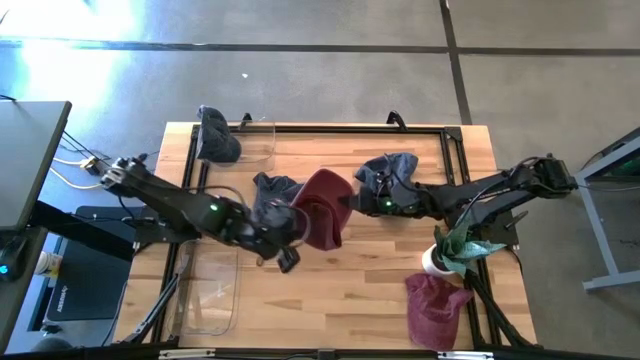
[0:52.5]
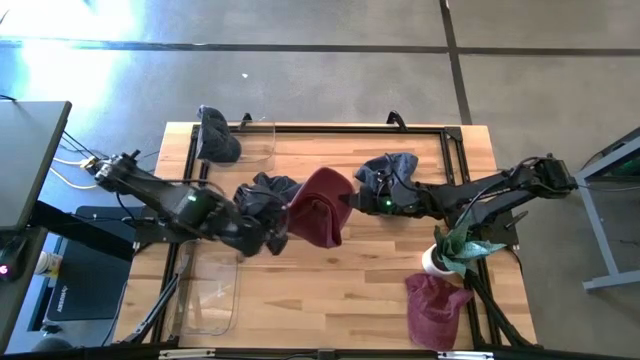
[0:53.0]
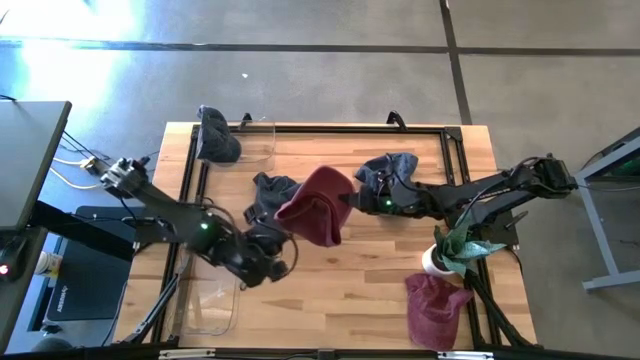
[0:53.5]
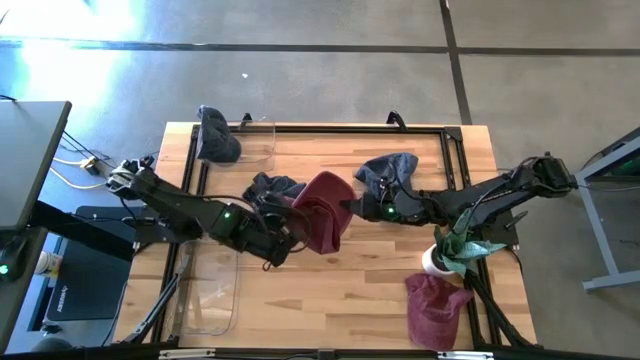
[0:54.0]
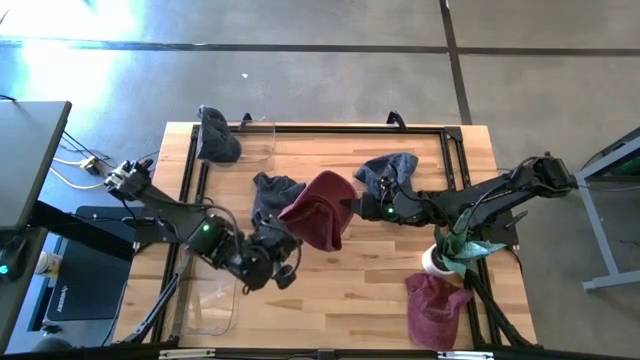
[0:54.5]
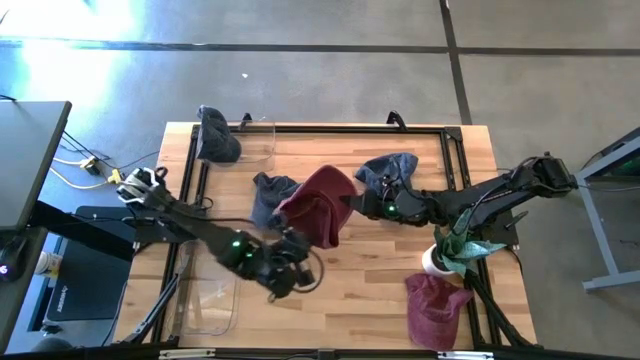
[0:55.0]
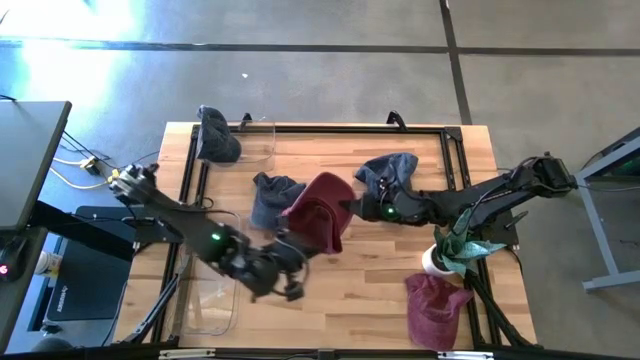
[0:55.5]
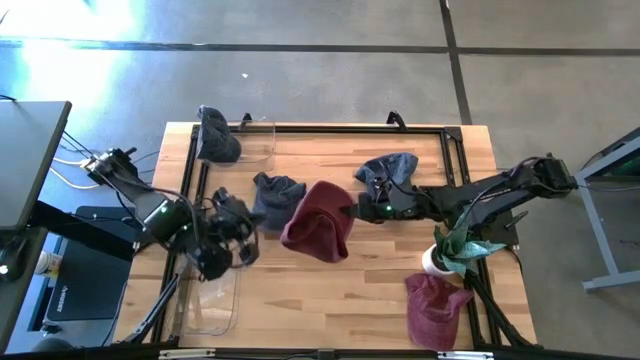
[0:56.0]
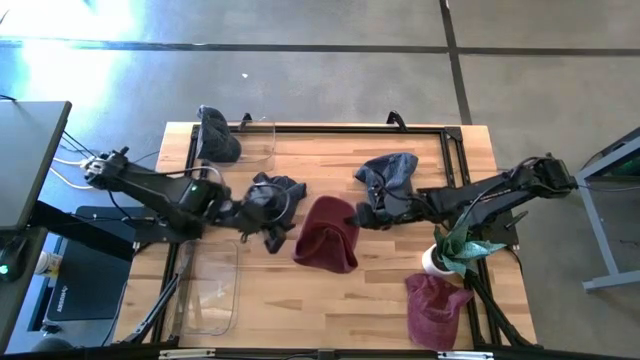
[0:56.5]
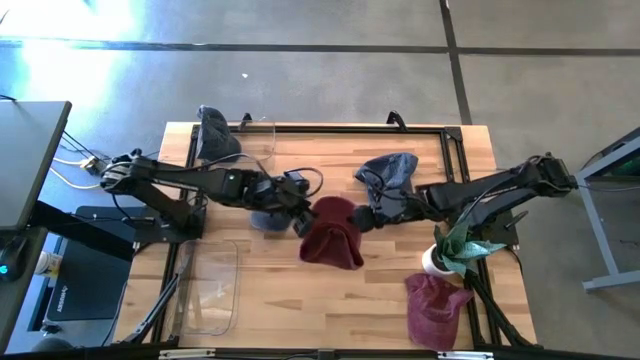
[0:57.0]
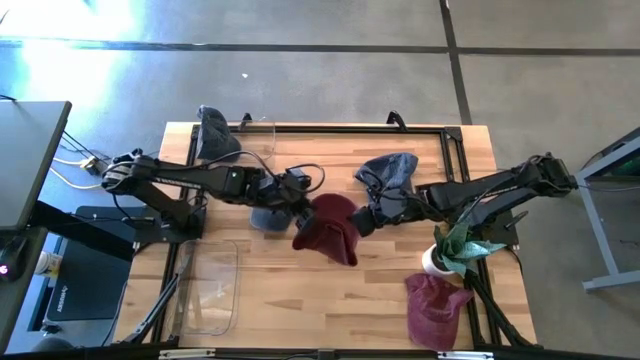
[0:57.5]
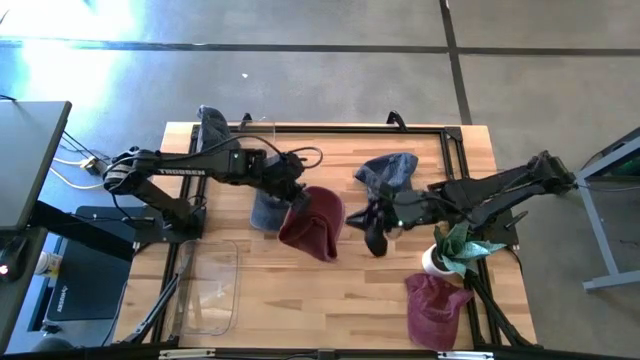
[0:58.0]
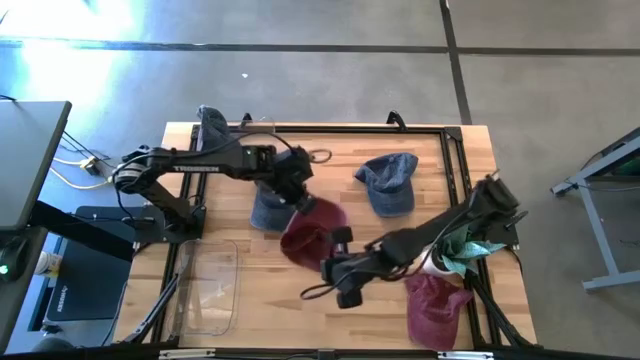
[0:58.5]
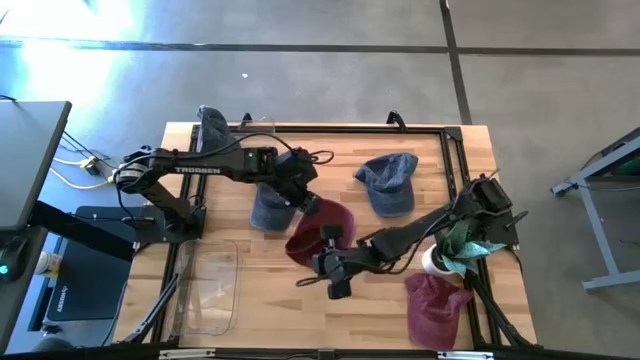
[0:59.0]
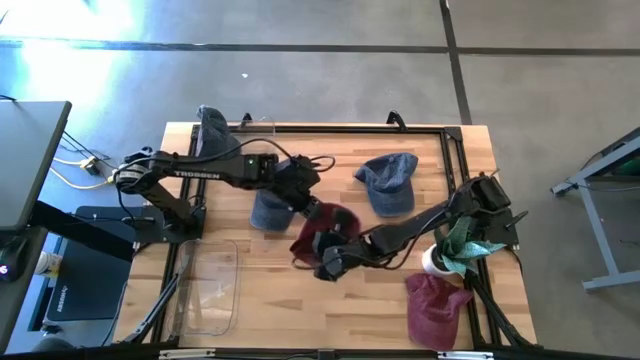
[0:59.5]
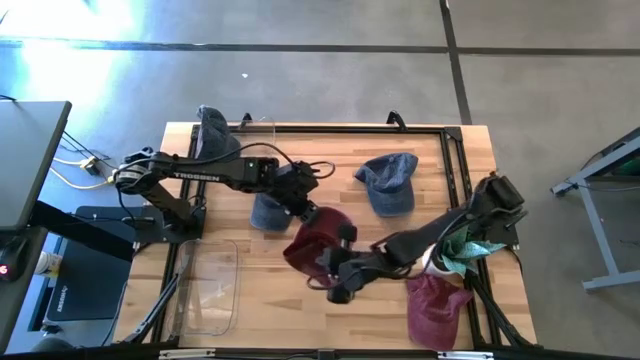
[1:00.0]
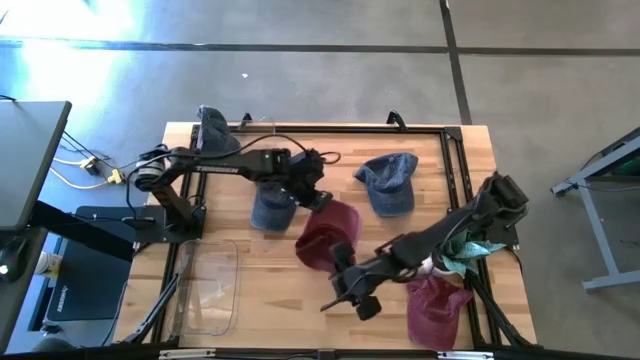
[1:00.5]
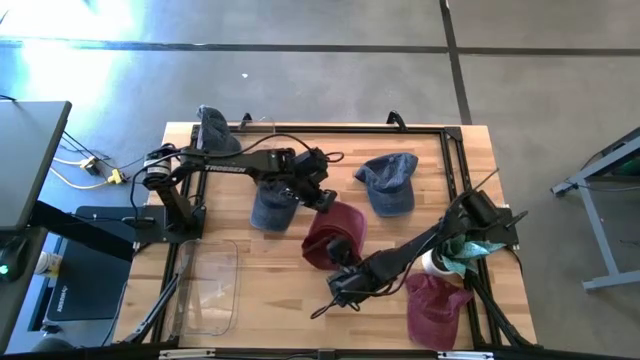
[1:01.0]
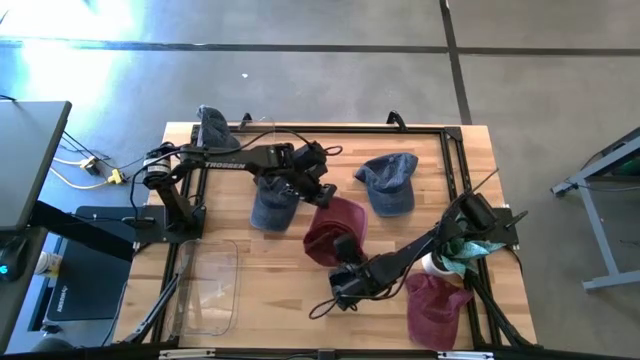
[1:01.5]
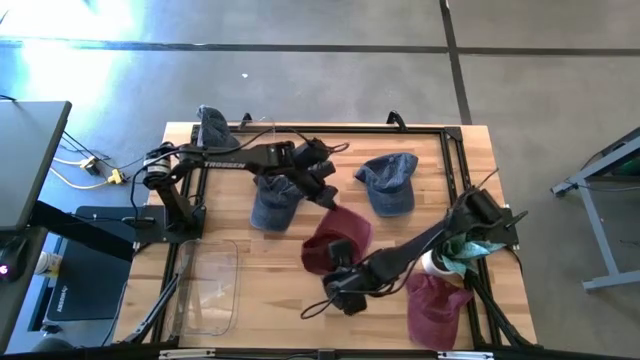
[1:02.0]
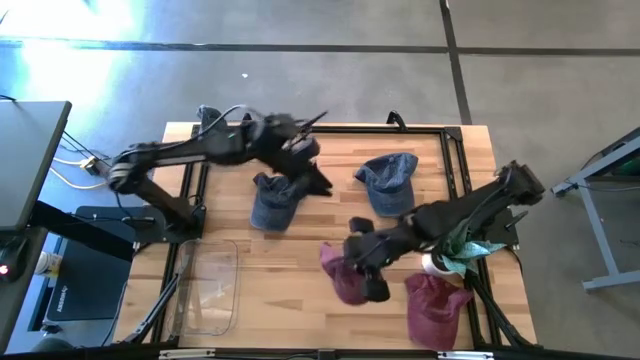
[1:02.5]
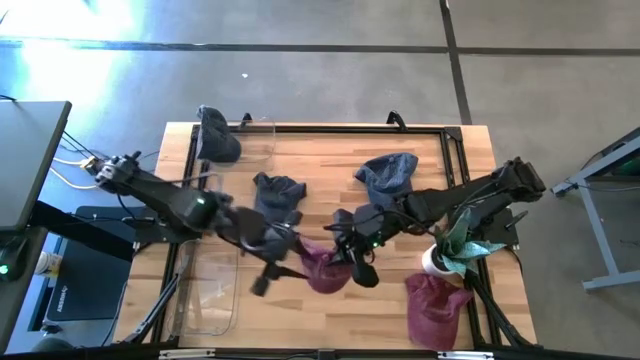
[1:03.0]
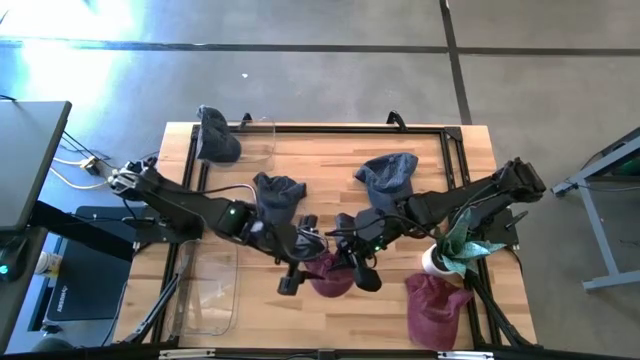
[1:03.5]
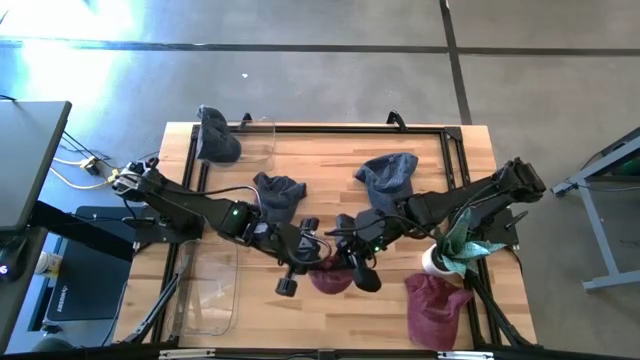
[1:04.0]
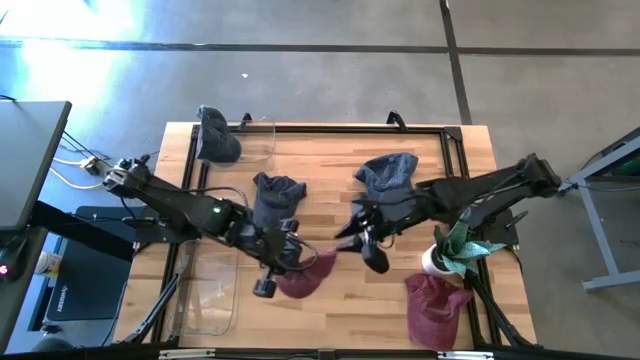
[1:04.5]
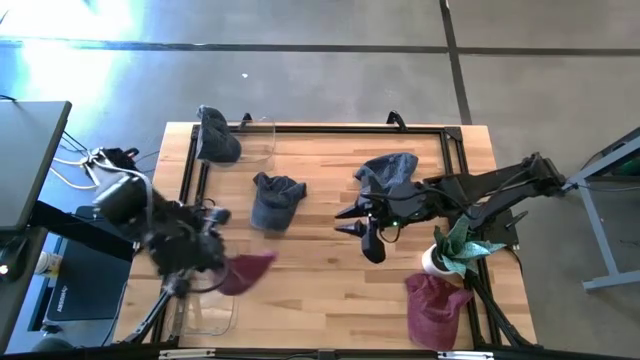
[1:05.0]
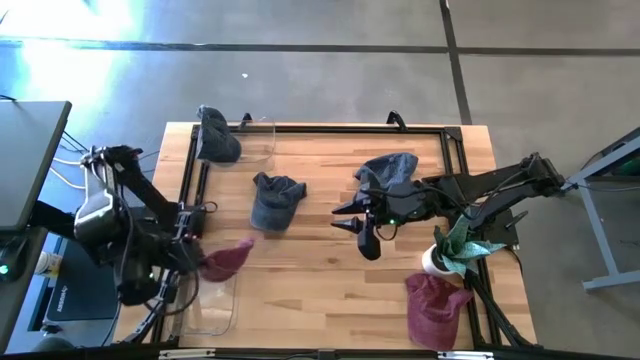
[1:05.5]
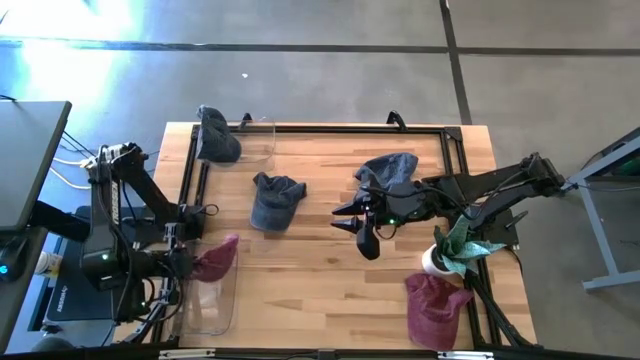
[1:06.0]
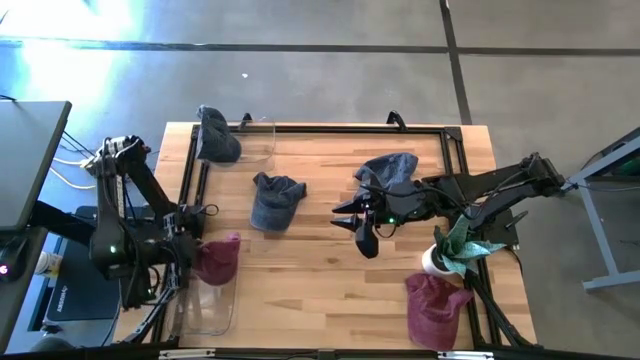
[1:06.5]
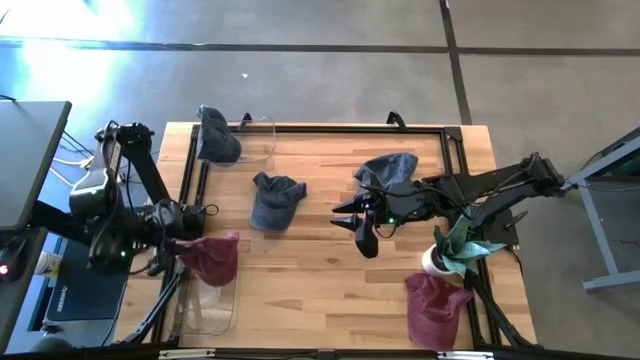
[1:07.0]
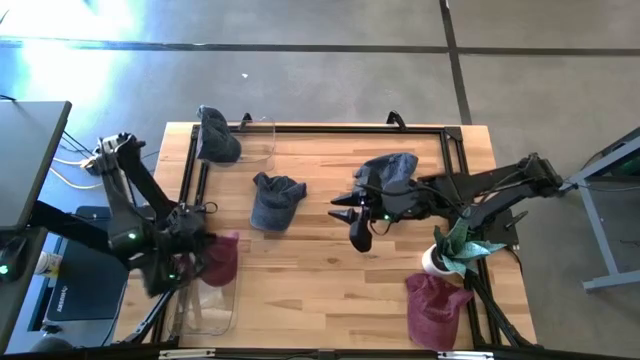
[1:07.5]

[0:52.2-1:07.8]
Task: Pick & Place hat
Put the left red cap into the bottom transparent bin
